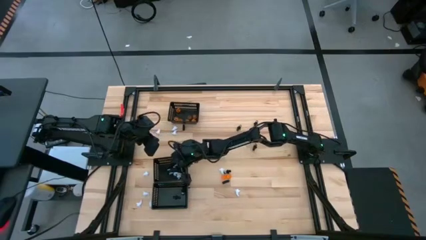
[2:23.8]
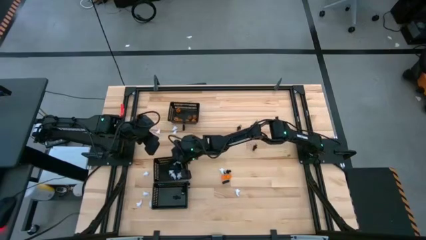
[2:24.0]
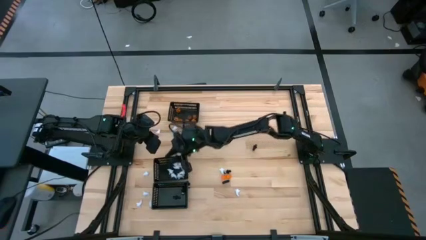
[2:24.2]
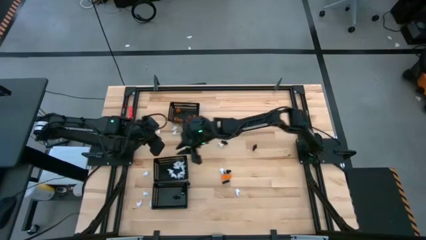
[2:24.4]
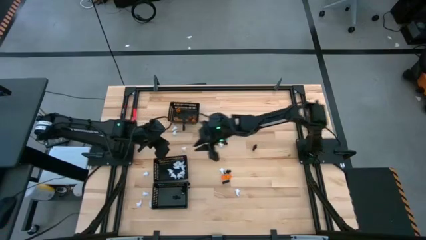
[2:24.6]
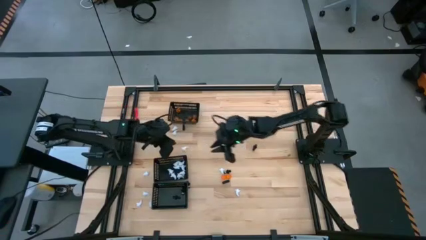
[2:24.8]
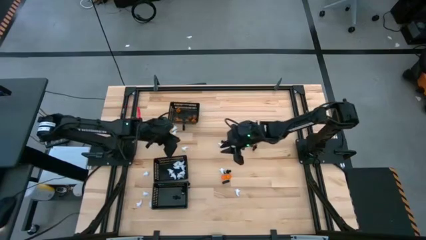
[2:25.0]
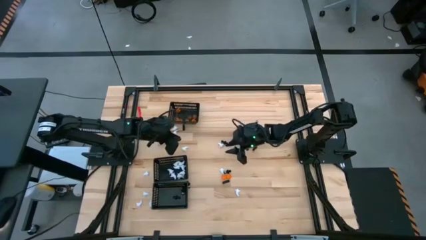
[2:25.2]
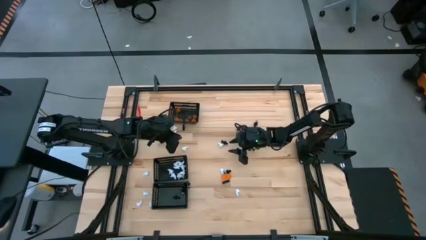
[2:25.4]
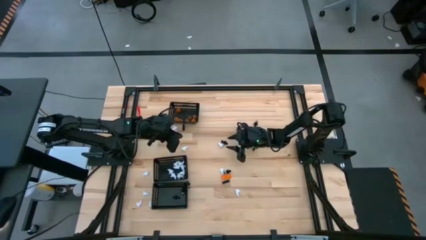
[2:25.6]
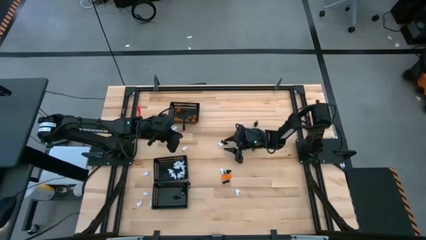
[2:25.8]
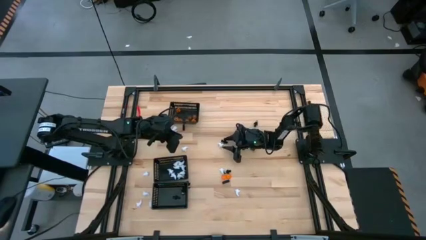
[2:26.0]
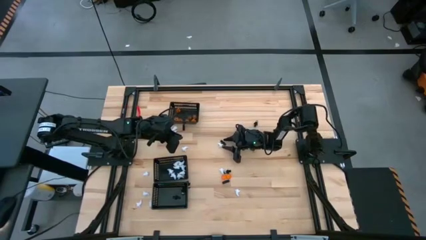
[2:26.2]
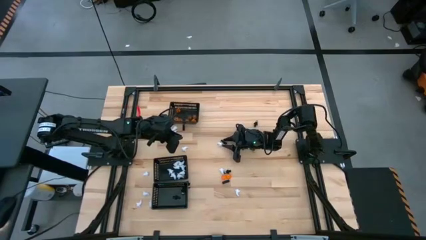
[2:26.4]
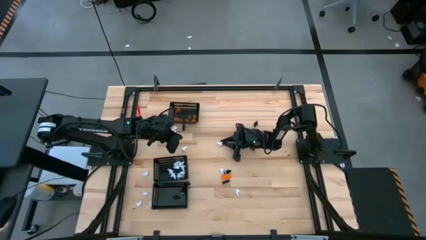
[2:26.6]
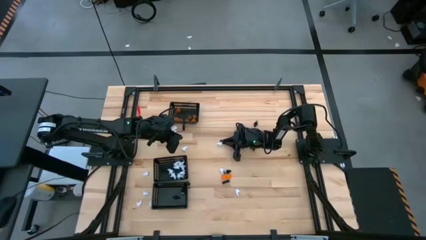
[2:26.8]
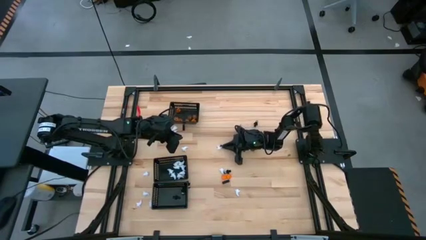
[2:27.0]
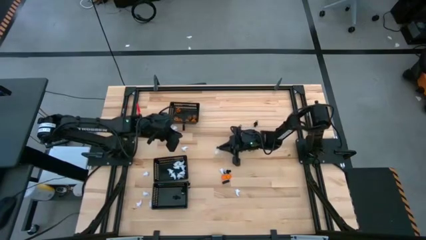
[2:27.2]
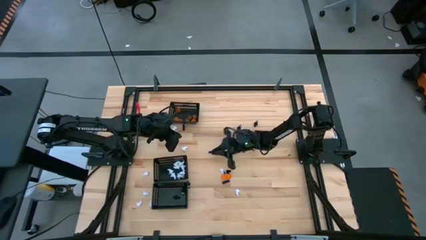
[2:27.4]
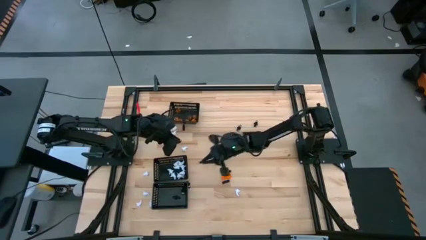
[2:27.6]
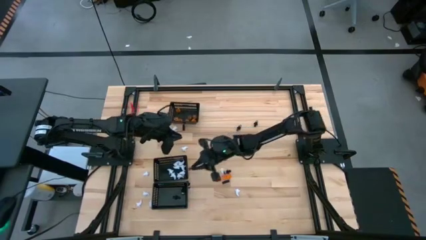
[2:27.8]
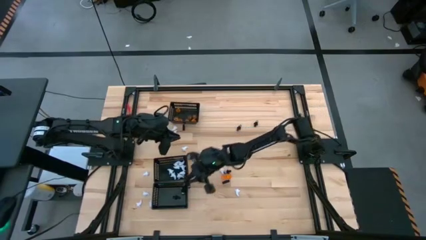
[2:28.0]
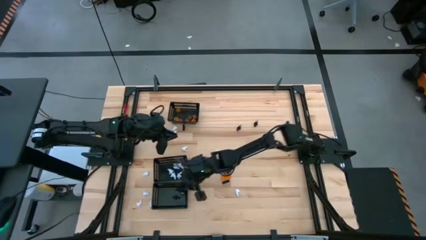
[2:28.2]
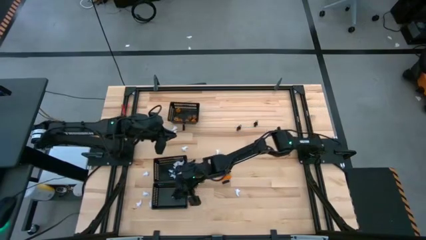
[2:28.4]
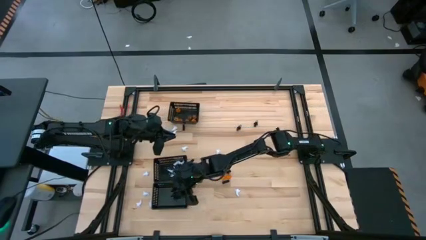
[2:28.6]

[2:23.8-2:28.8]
Task: Sort Halloween decoration
Put the black skeleton toy into the bottom black bin

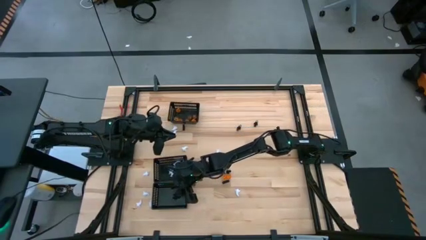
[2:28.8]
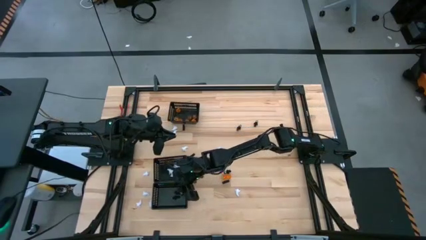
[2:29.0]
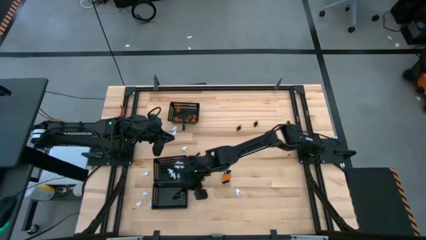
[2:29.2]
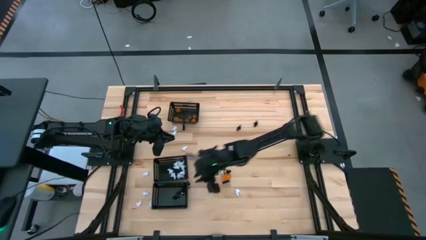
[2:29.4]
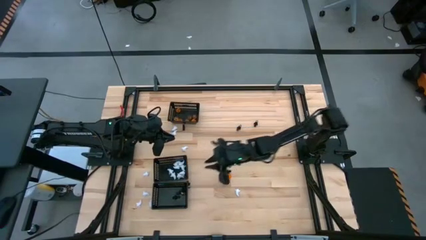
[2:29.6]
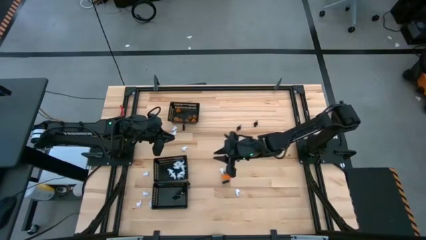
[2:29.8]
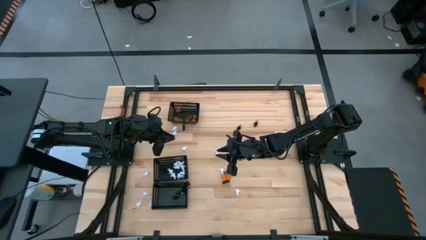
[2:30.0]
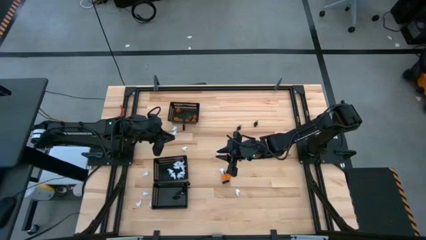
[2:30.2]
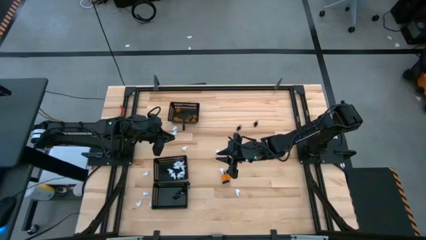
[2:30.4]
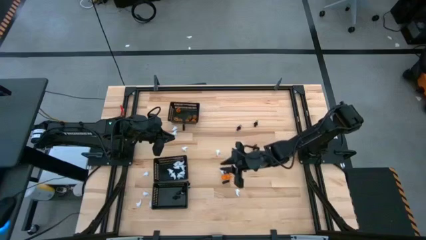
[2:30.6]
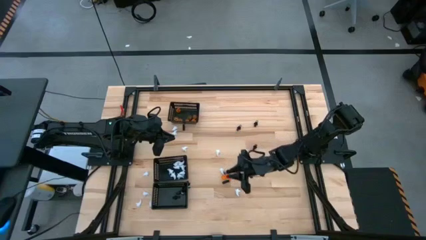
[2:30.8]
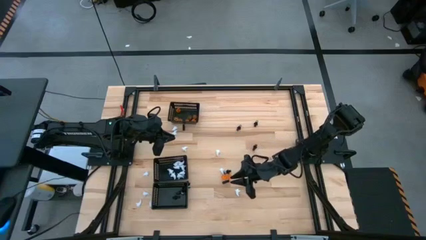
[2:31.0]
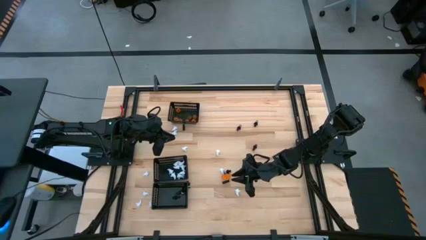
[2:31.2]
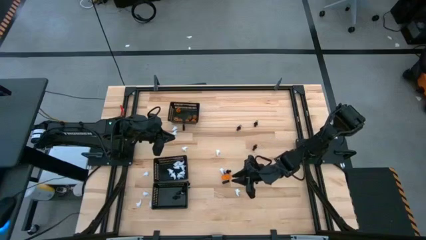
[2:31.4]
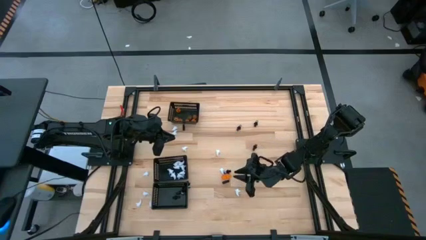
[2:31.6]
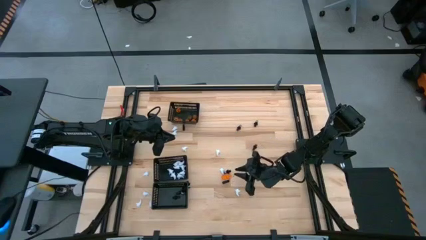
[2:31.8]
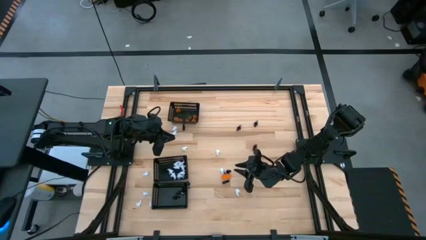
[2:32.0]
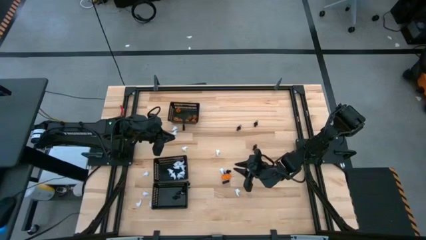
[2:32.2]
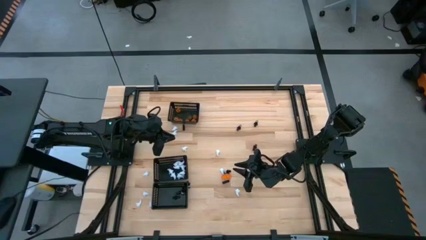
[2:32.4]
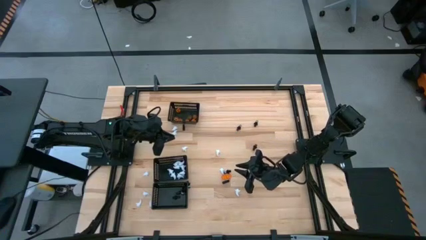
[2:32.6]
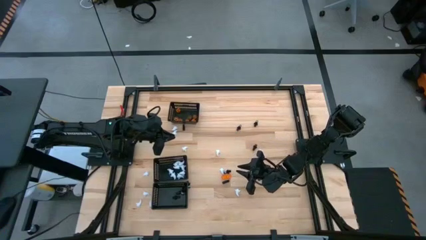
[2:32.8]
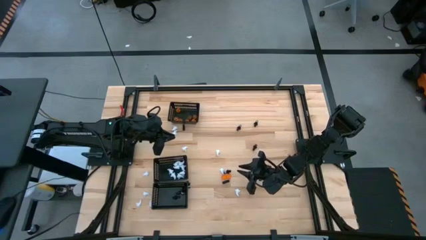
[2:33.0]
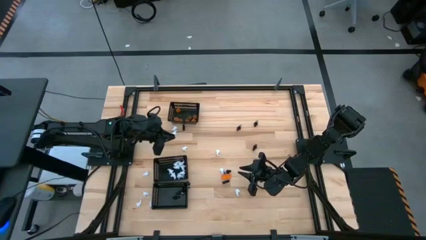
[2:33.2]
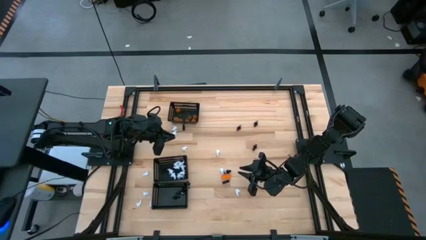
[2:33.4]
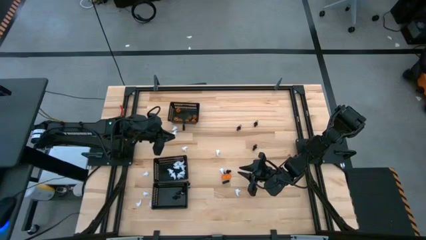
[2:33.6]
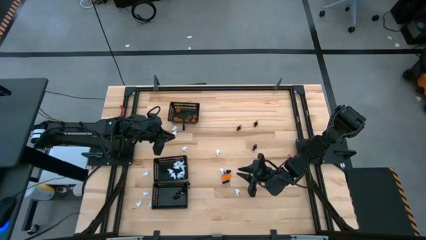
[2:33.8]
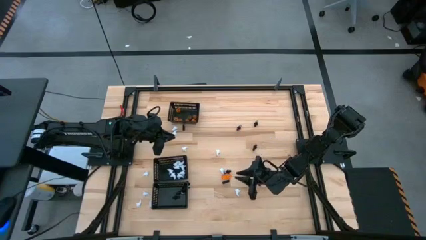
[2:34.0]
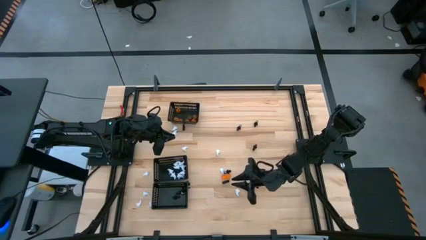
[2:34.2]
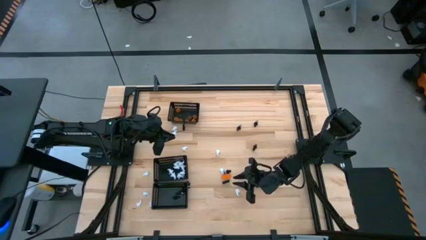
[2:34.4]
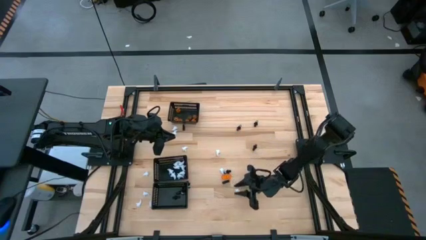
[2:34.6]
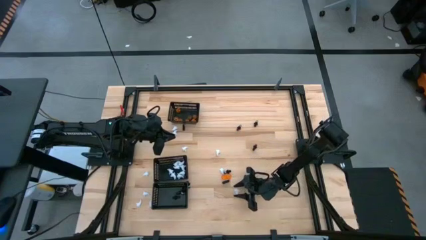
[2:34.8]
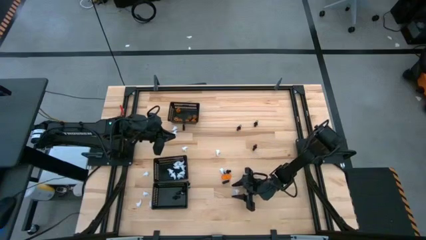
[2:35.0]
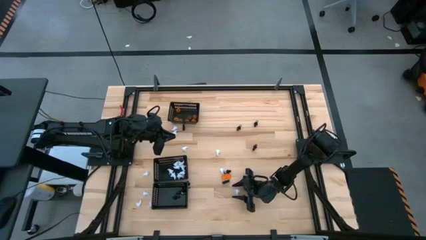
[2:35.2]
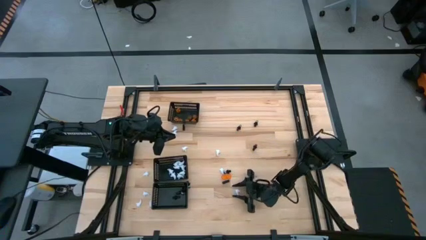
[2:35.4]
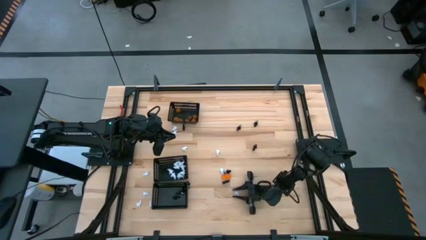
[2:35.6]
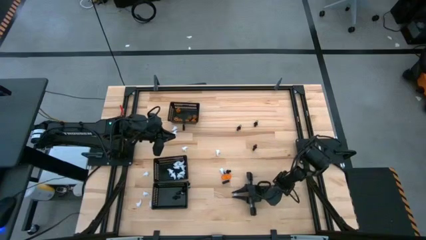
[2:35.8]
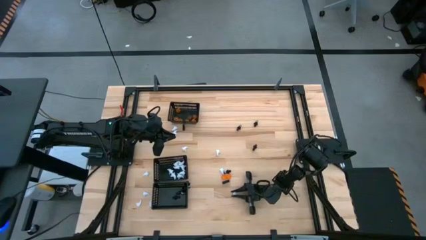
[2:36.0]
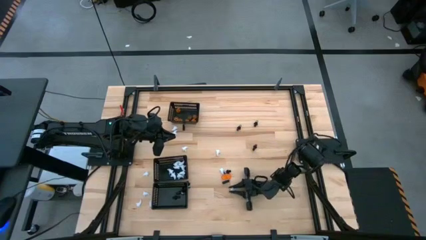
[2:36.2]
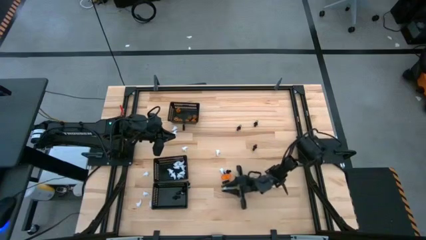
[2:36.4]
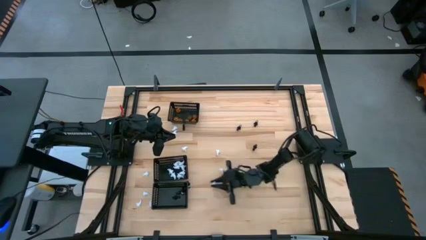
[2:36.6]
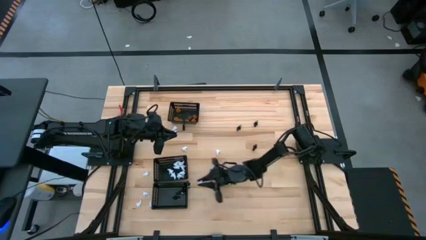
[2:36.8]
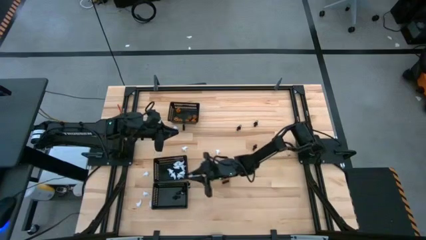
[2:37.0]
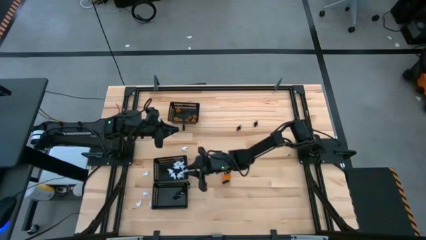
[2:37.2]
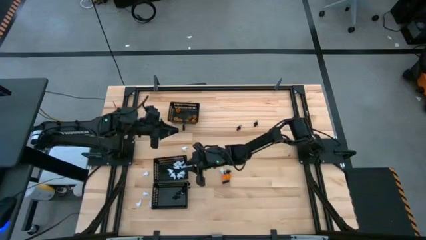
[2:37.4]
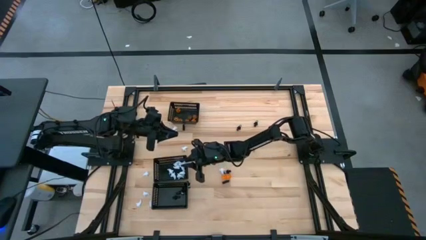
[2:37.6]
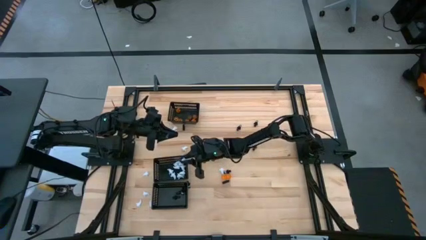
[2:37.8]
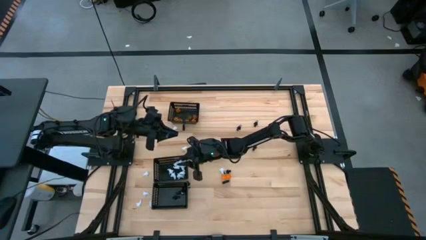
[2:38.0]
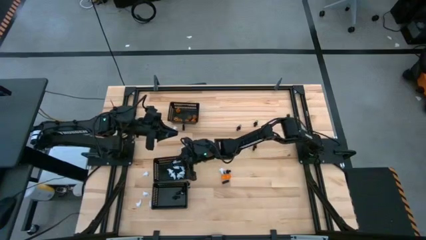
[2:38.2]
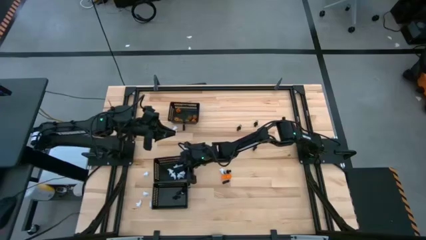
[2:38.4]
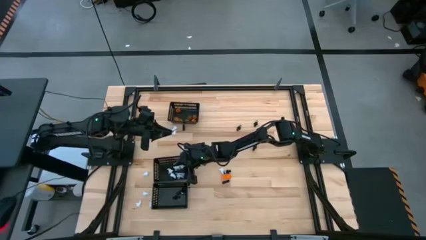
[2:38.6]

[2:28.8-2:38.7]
Put the white toy into the middle black bin

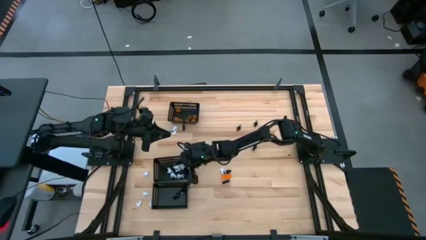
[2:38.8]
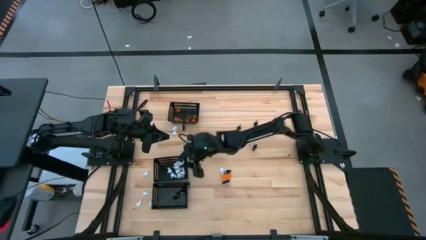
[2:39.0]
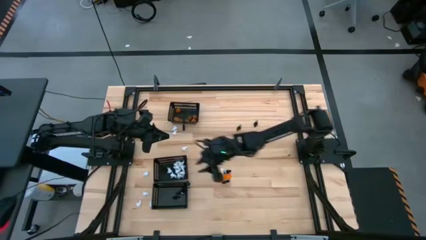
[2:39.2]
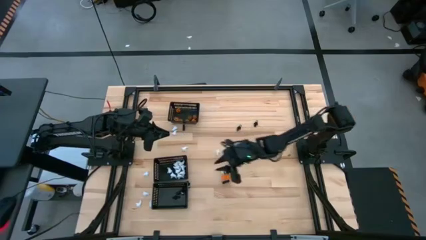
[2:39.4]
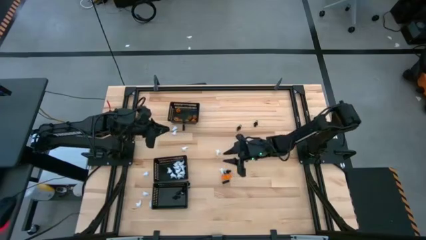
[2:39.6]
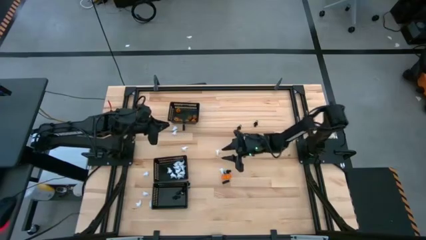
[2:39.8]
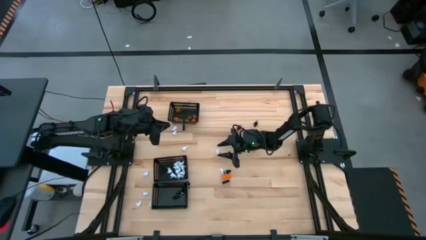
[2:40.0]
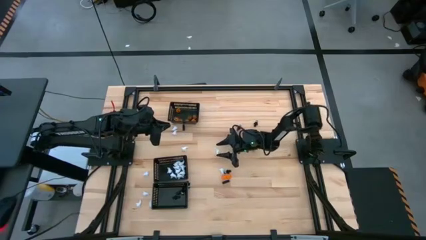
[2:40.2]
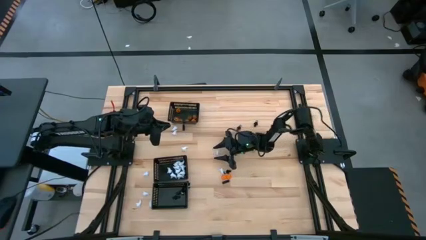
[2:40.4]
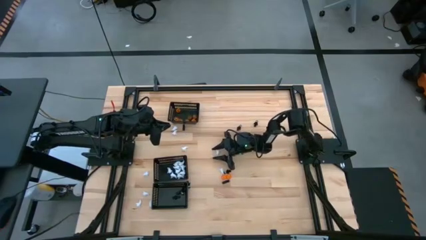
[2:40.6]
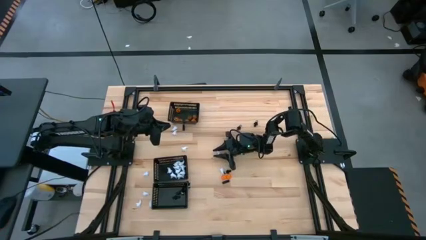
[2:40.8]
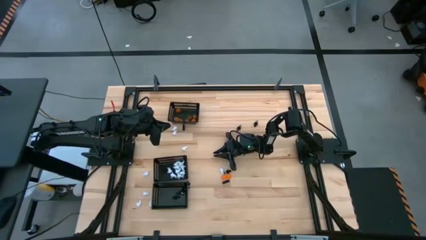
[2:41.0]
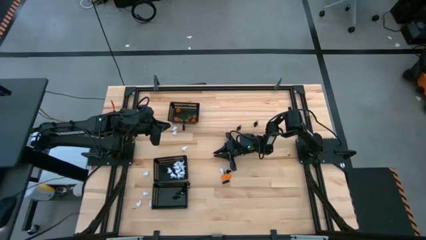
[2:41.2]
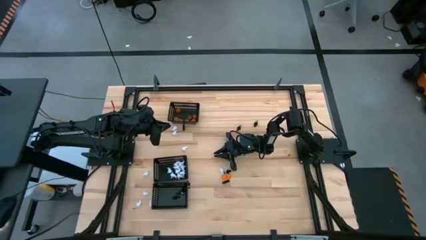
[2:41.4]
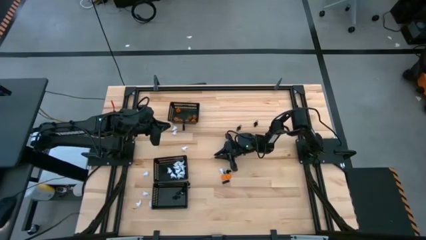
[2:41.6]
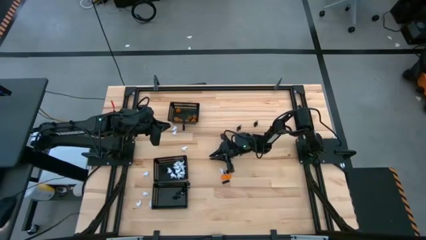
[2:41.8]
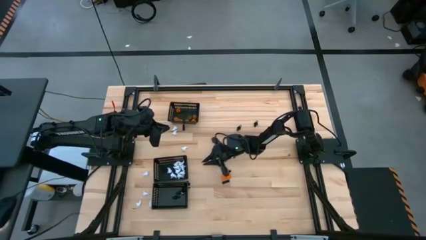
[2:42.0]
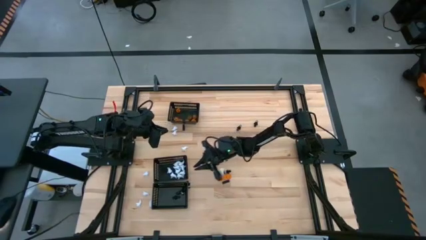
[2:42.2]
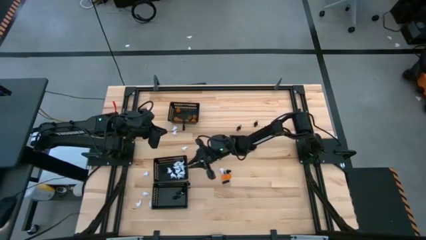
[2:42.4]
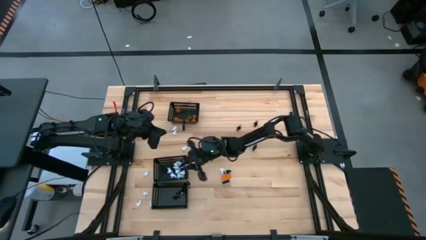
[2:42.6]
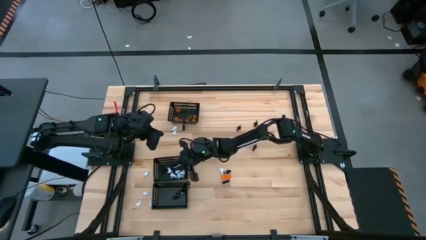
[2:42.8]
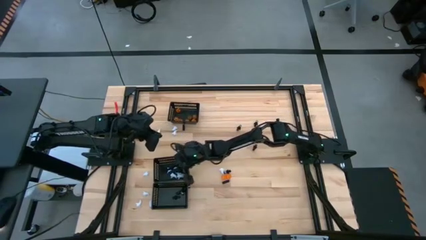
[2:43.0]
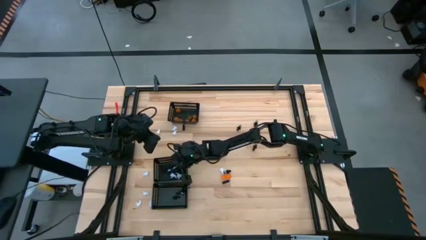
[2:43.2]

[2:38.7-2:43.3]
Put the white toy into the middle black bin
